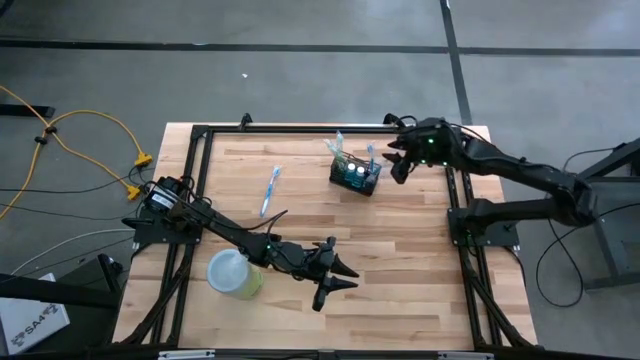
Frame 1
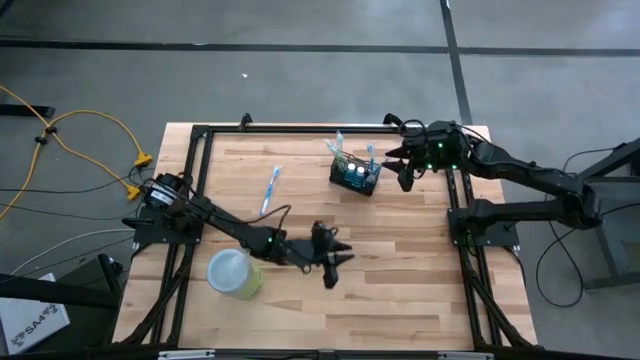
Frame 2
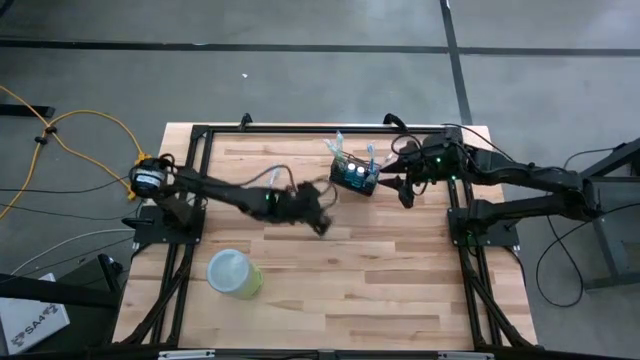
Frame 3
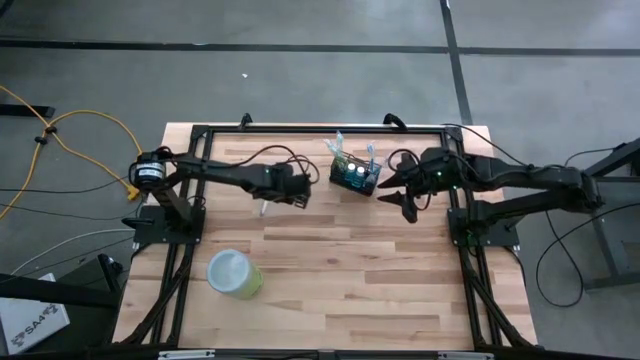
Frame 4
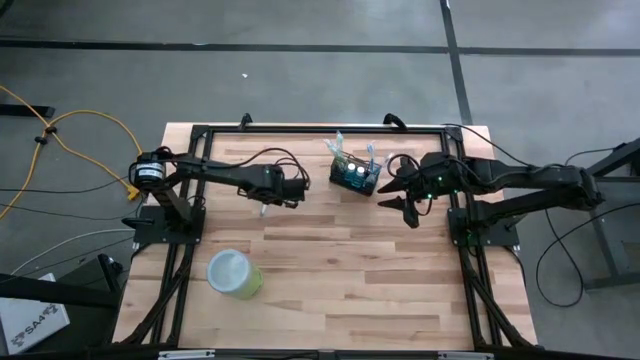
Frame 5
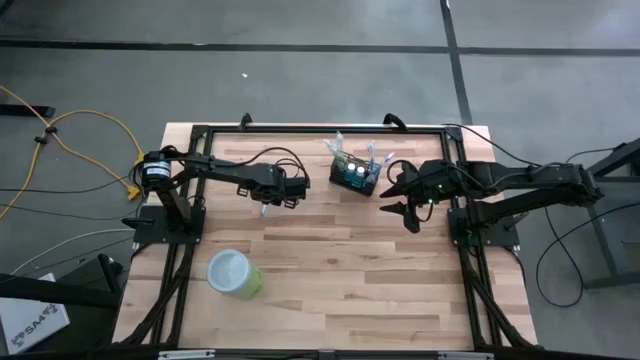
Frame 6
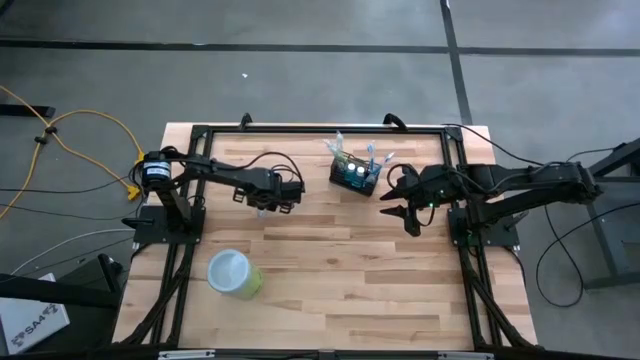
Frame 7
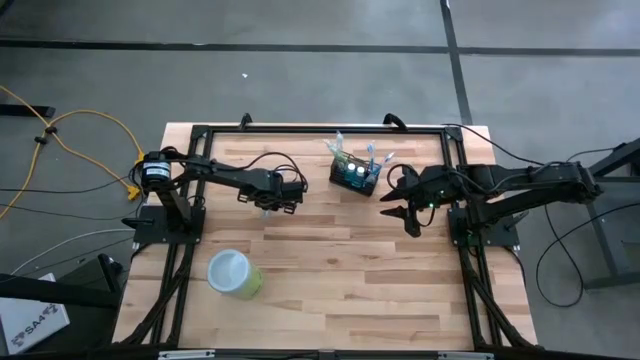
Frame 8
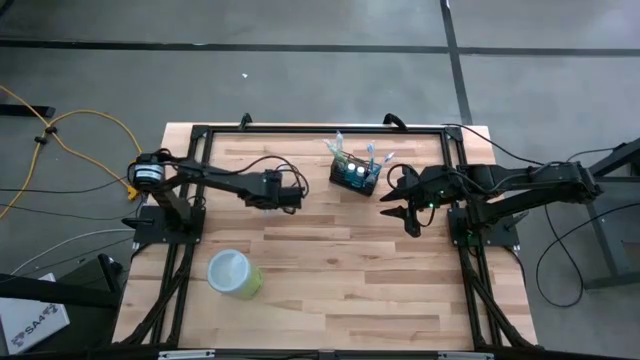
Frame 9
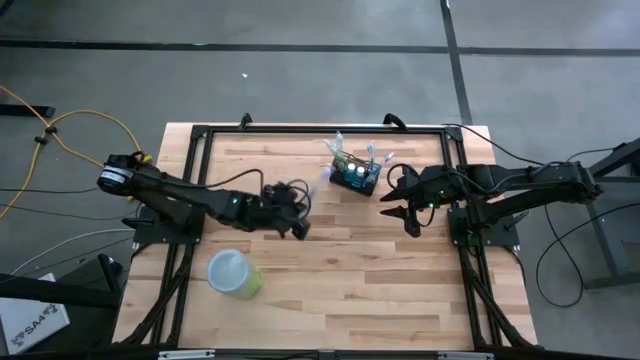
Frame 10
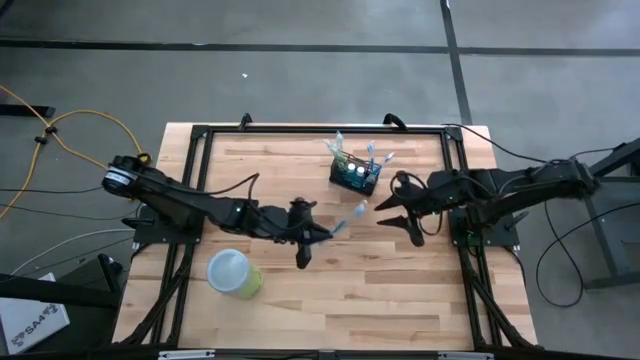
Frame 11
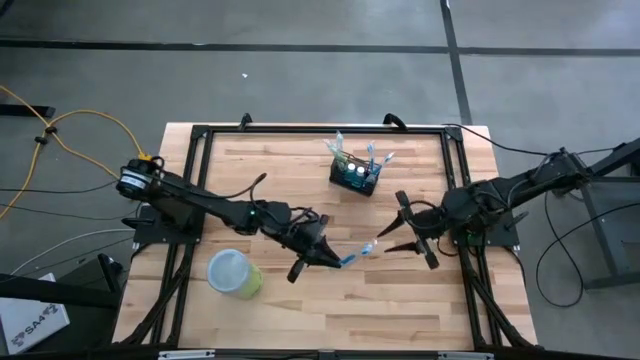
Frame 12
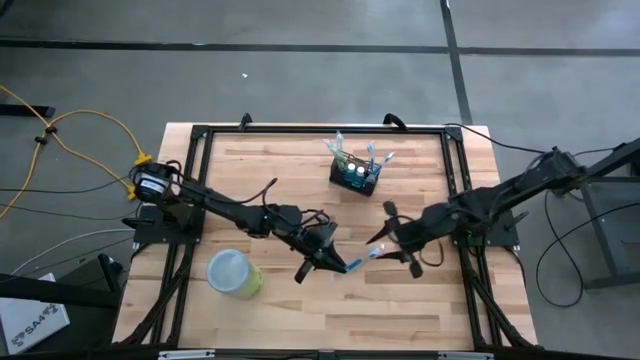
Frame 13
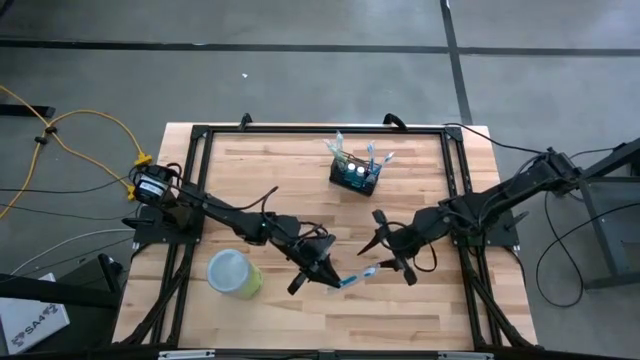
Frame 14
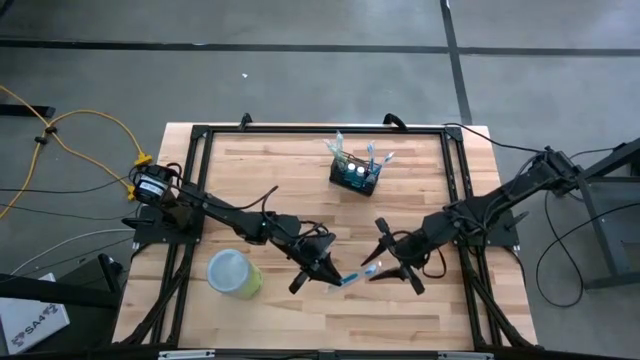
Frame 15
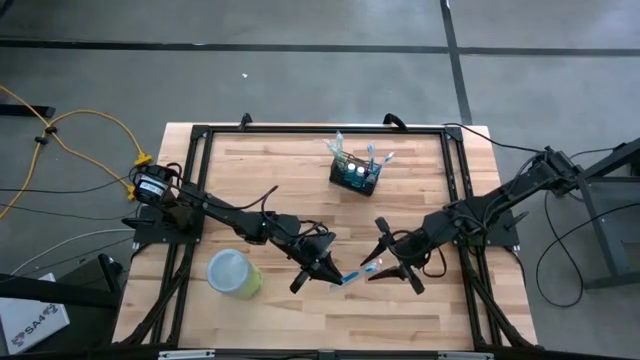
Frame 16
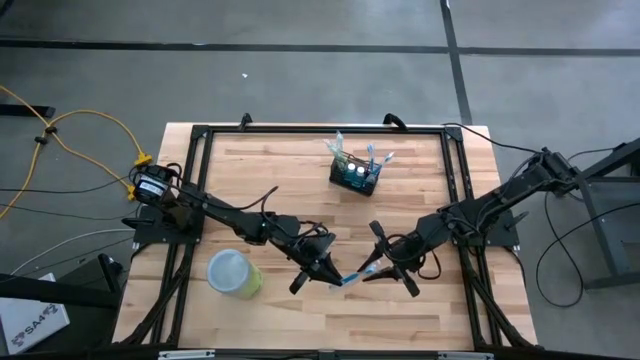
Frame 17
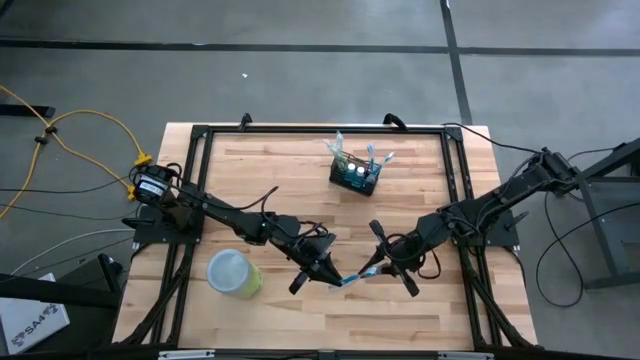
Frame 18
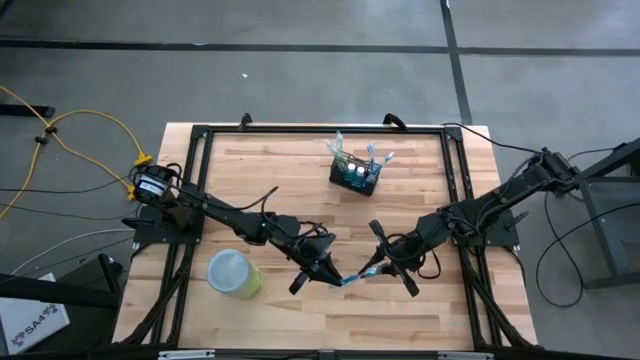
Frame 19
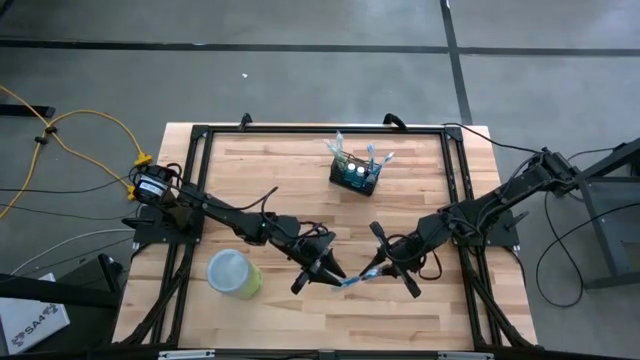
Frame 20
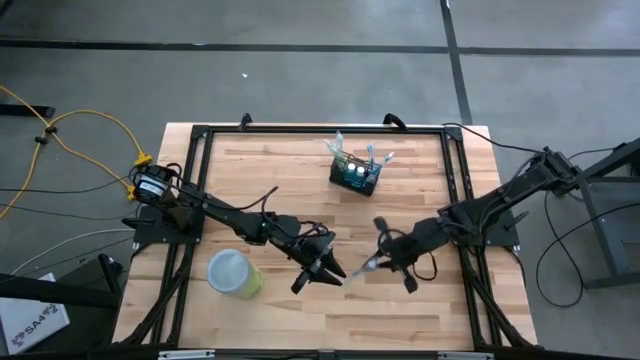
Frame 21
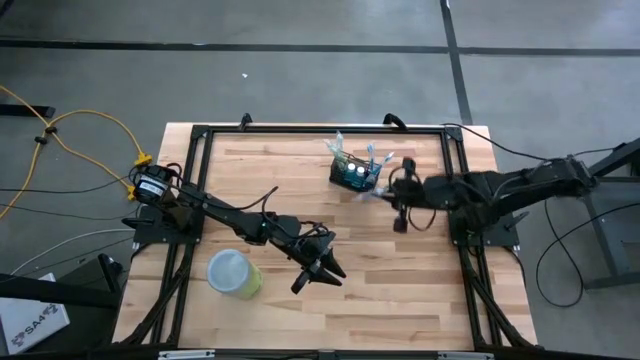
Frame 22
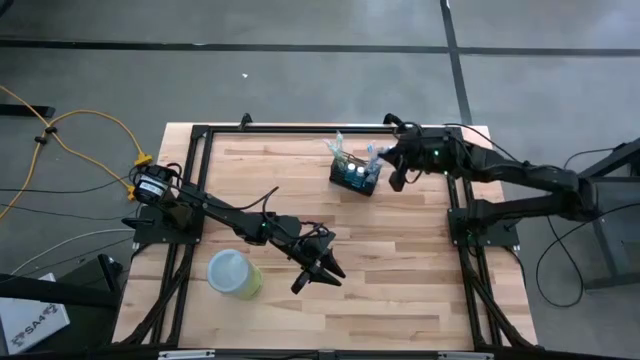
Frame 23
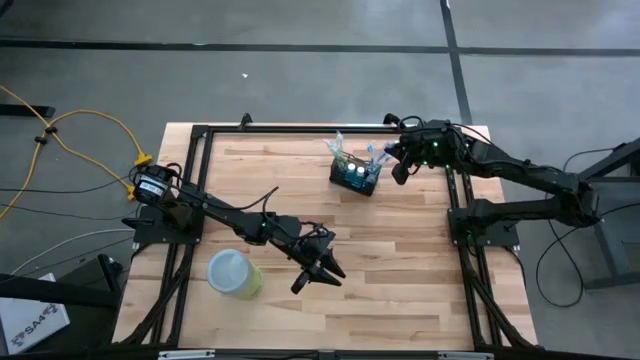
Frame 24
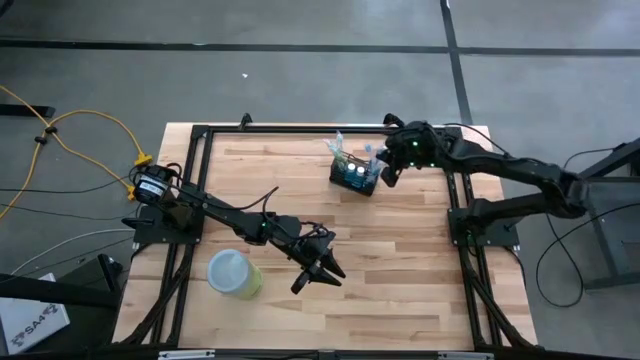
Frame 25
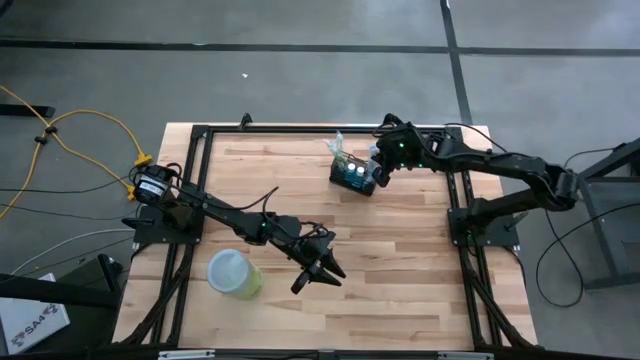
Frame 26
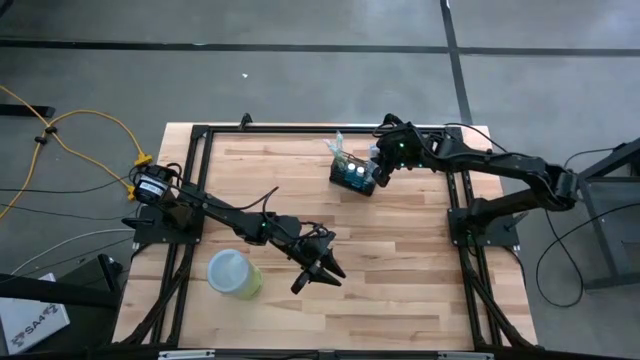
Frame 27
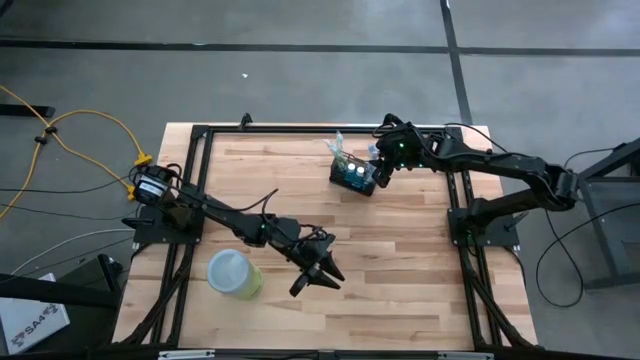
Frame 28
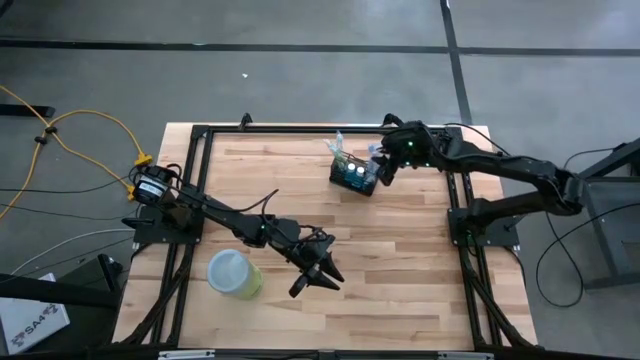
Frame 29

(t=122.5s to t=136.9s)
Task: Pick & Place toothbrushing station
Put the blue toothbrush into the right section of the black mesh organizer

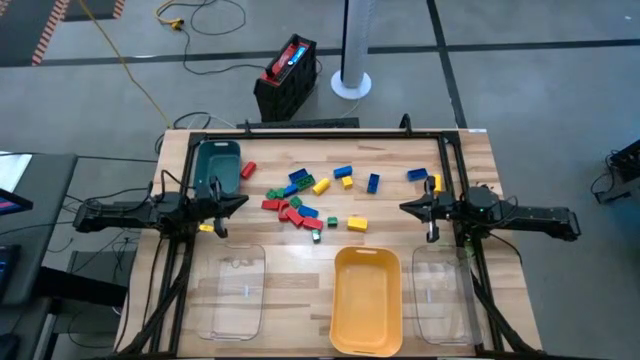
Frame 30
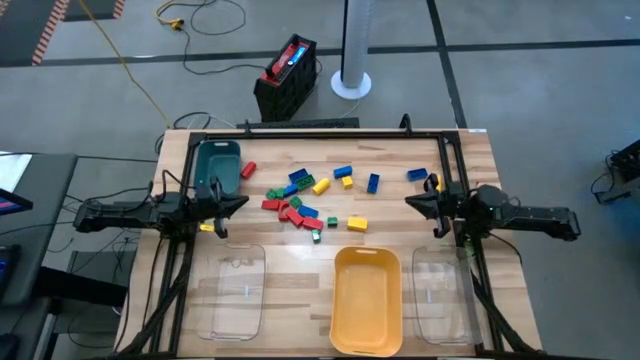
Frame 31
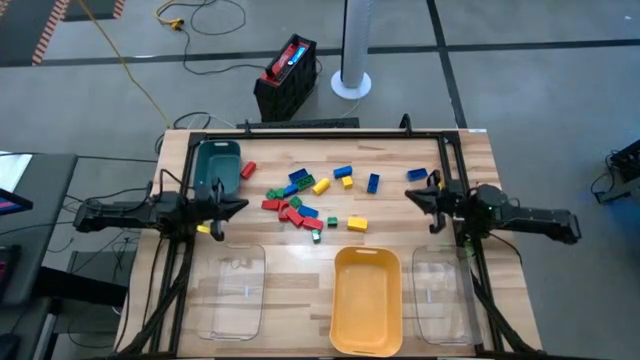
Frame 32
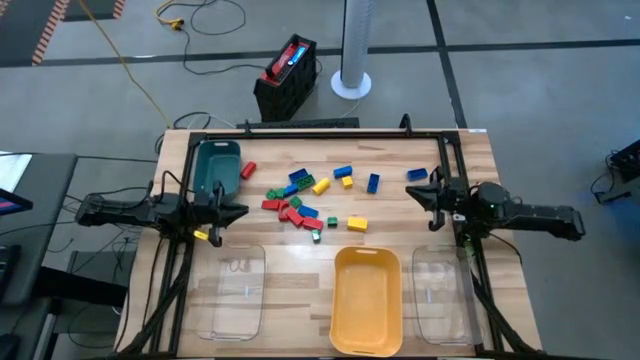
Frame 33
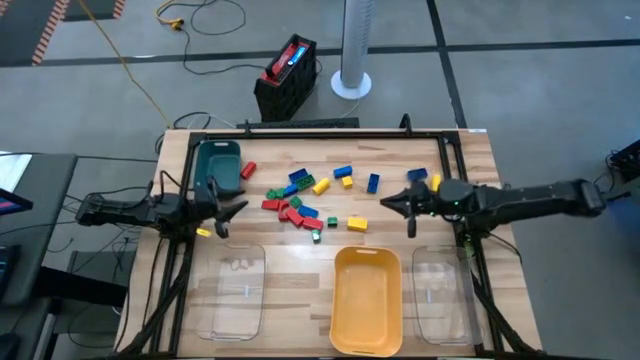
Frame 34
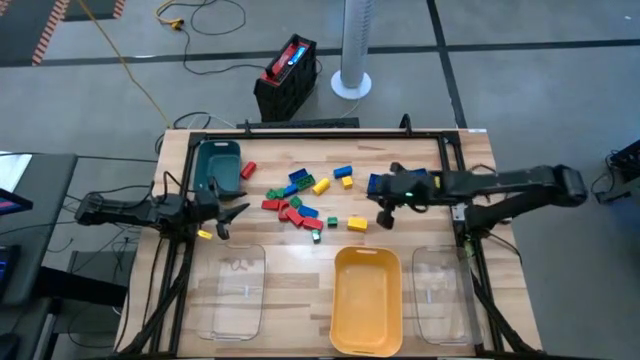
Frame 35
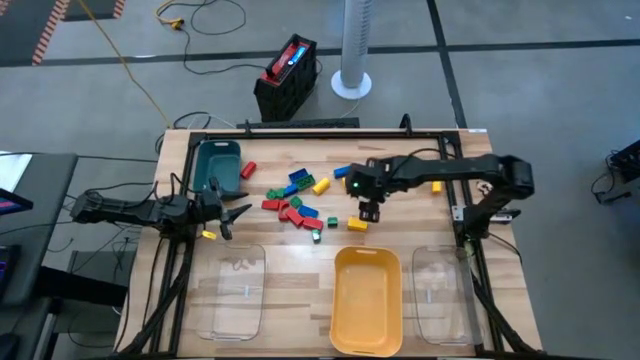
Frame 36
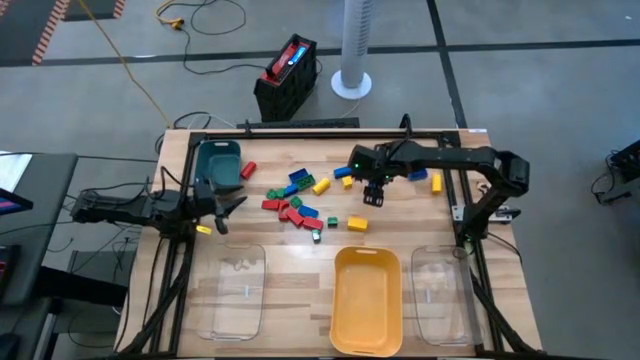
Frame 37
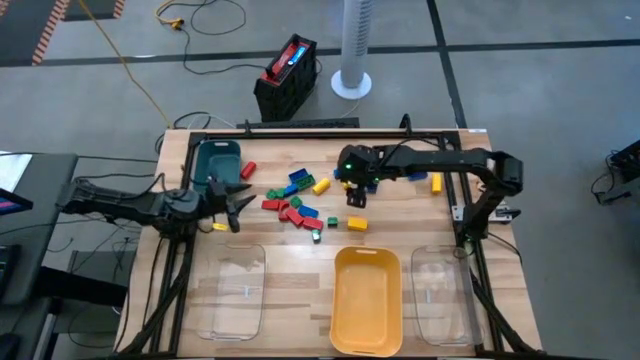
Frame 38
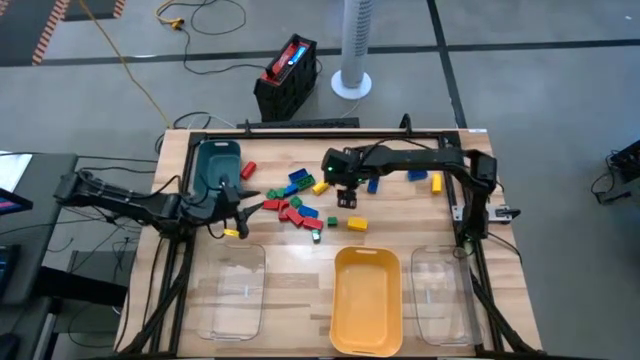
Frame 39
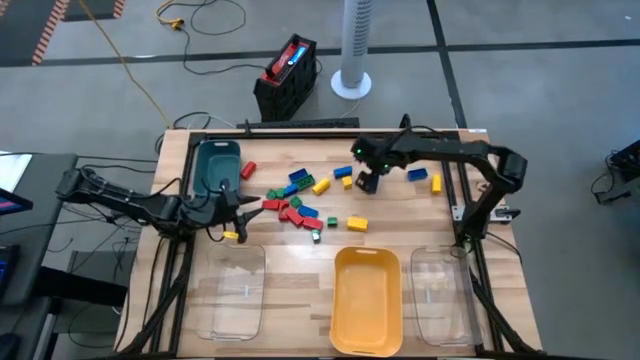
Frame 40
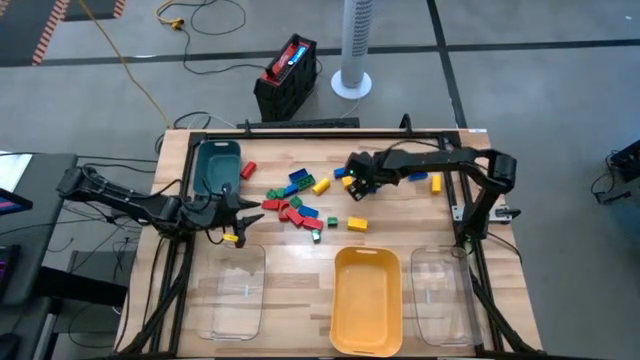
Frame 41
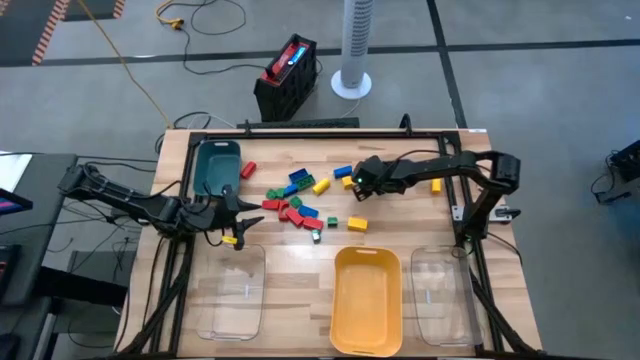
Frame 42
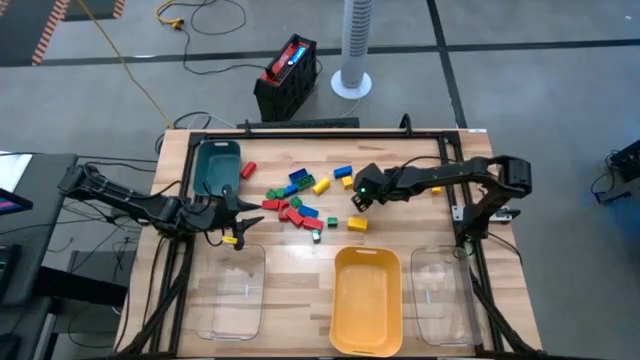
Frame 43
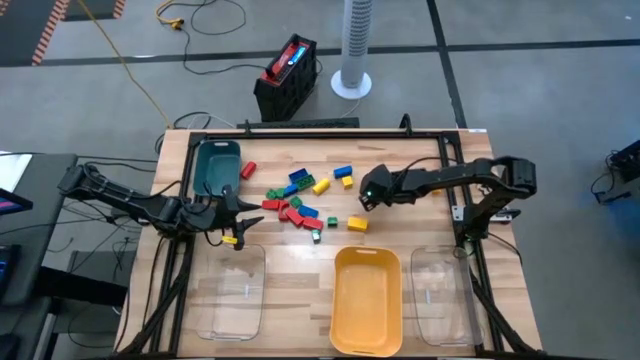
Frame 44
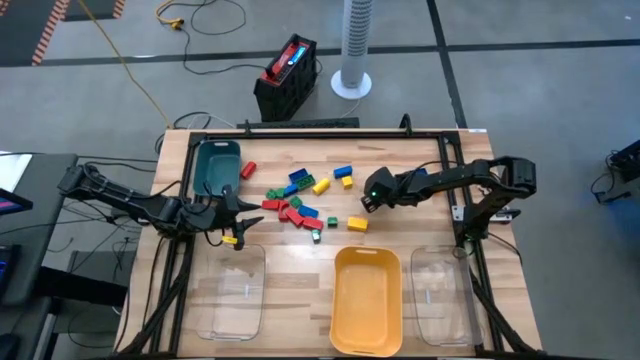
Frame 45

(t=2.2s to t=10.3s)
Task: Sort blocks
Put the blue game piece into the yellow bin

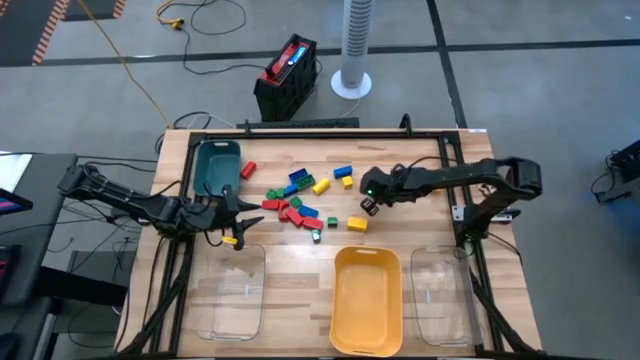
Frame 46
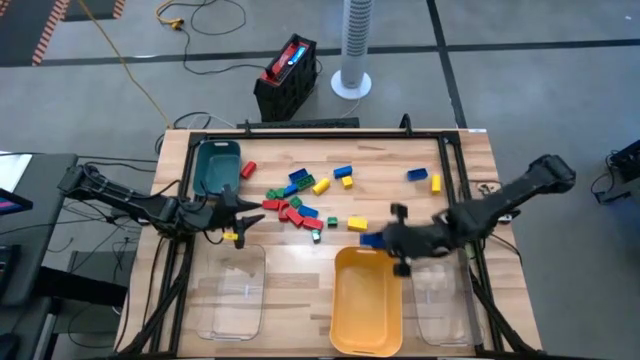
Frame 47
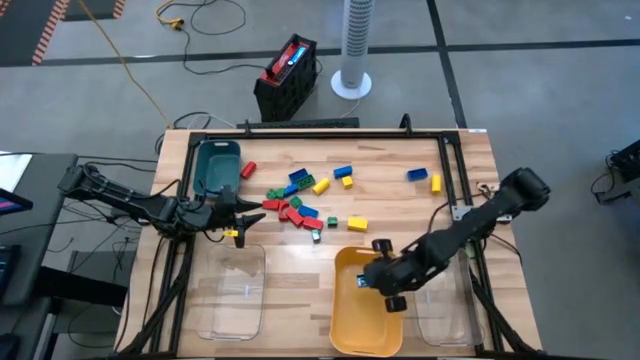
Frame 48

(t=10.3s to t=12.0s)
Put the blue game piece into the yellow bin
